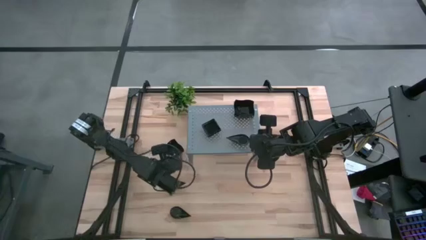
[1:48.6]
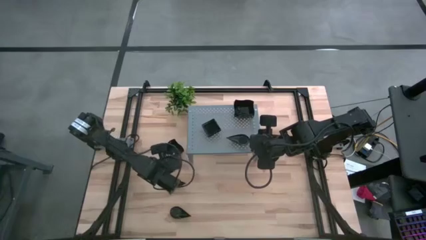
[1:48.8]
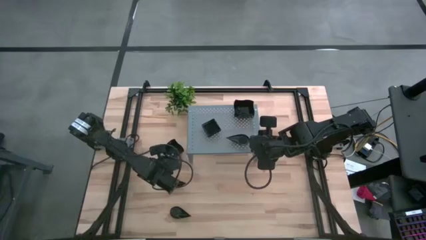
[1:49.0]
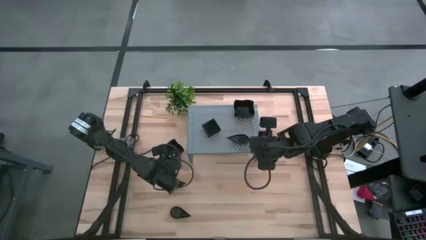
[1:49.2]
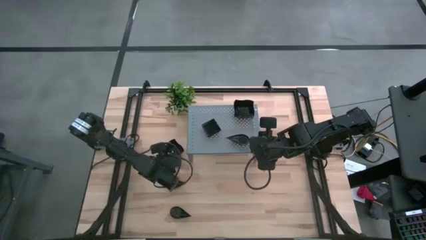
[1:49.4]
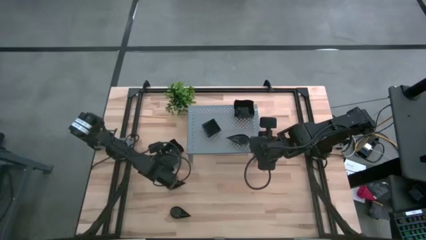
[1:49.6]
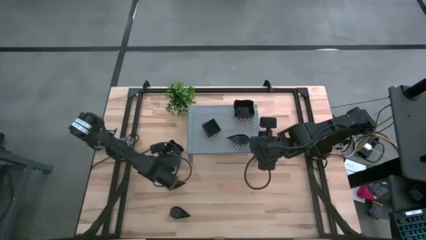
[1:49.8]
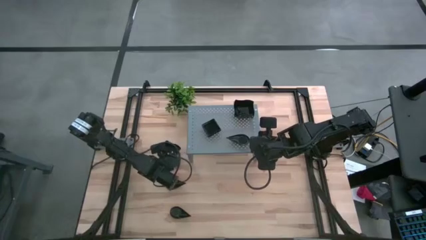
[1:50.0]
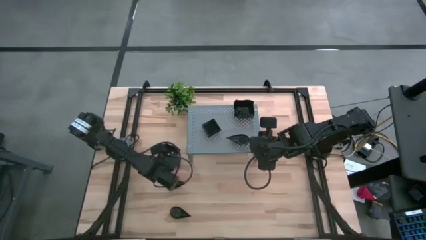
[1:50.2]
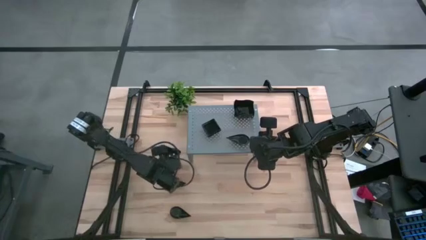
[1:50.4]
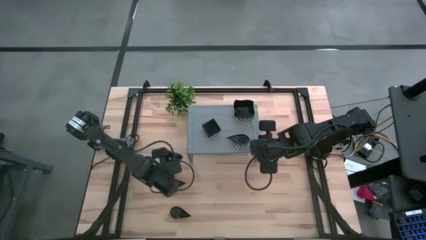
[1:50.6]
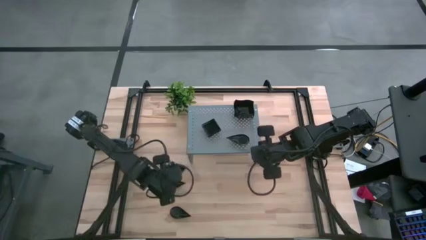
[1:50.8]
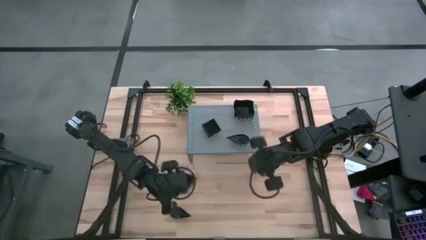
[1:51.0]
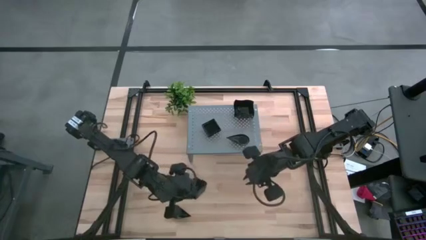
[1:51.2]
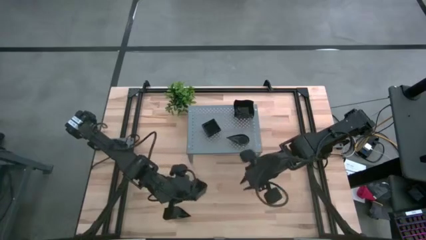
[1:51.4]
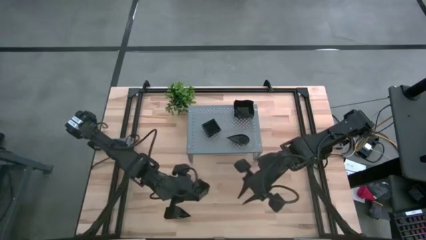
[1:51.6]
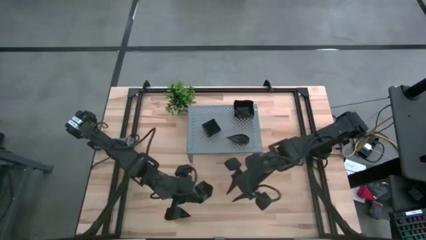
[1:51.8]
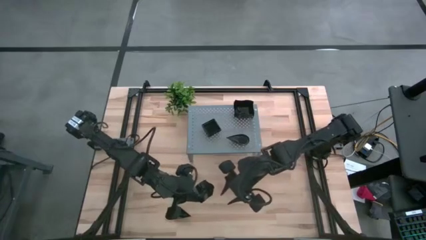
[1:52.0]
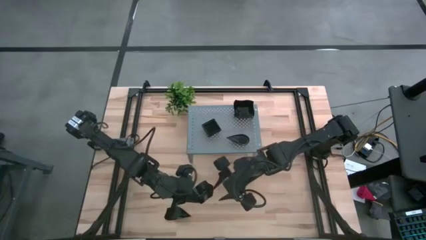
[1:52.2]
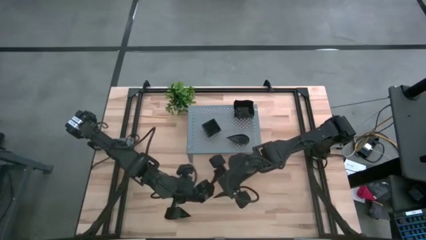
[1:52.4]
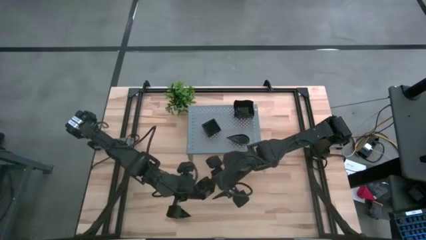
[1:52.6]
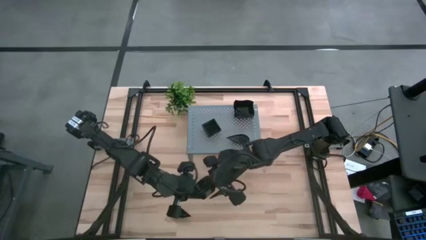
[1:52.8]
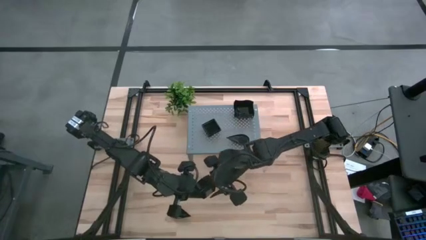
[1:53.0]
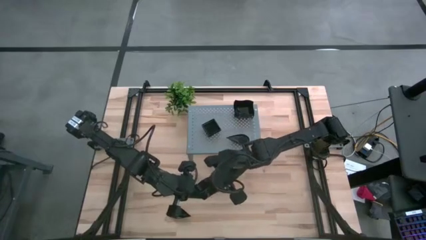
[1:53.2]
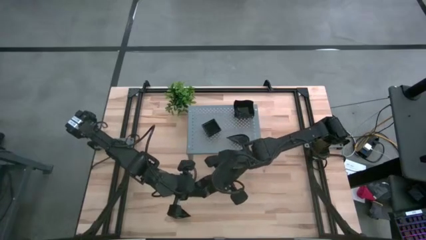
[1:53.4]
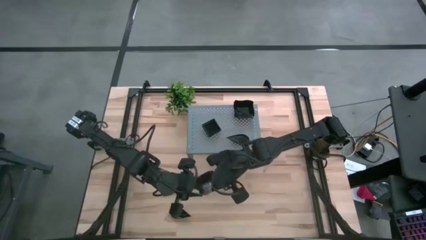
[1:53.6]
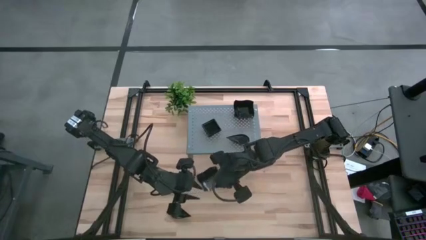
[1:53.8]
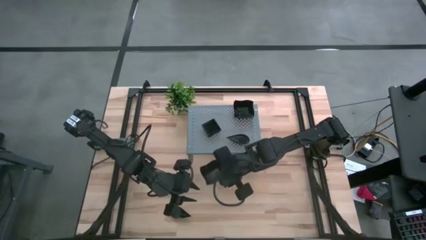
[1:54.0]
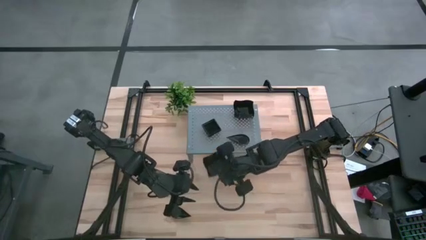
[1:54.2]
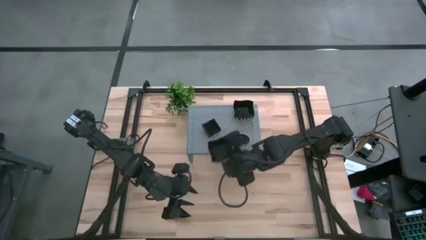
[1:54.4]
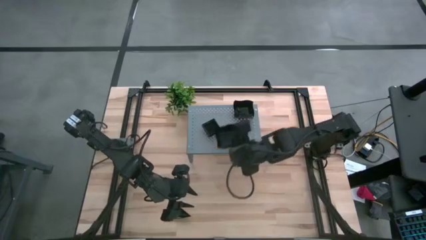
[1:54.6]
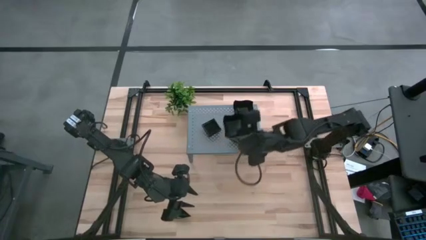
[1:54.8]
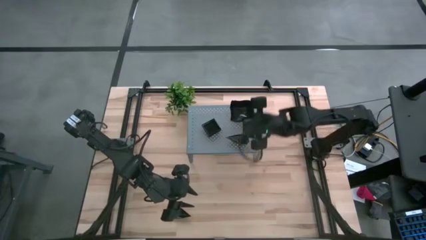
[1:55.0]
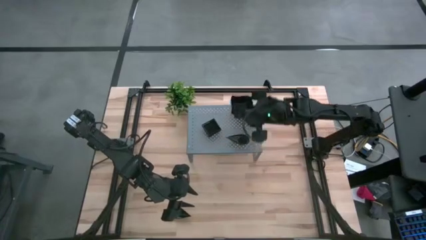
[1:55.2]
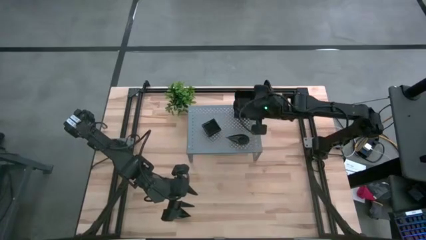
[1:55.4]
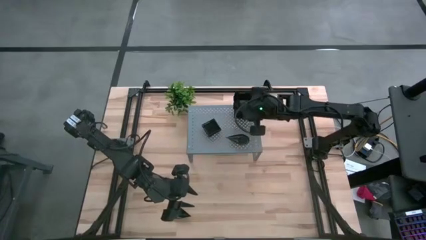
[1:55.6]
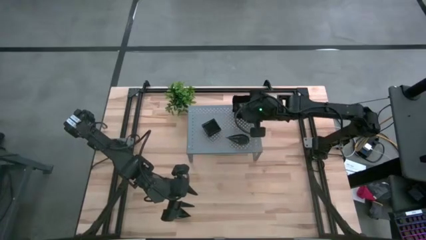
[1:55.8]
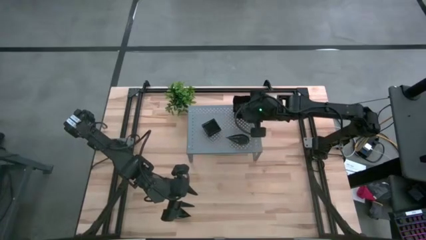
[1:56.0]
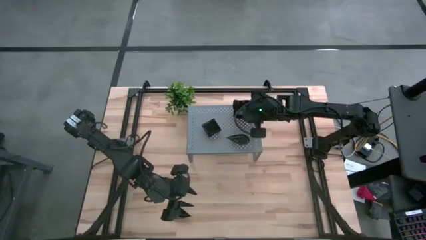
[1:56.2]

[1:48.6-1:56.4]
Task: Pick & Place Mini shaped plates
Stack the black distorted square plate on top of the black distorted square plate on the shelf

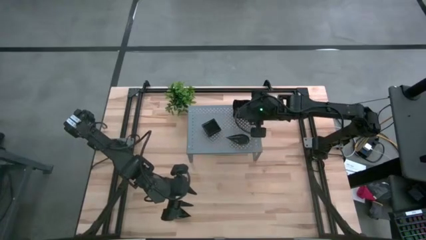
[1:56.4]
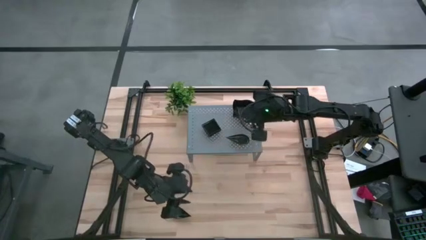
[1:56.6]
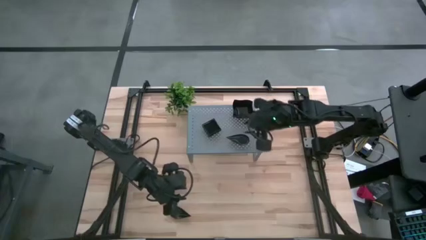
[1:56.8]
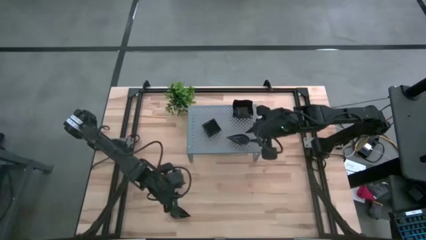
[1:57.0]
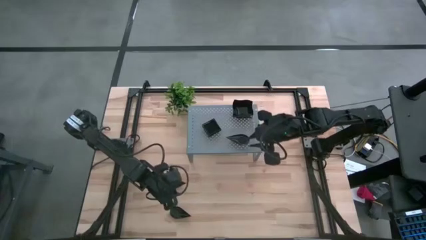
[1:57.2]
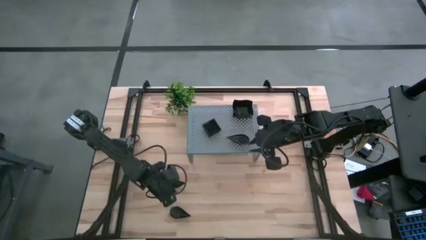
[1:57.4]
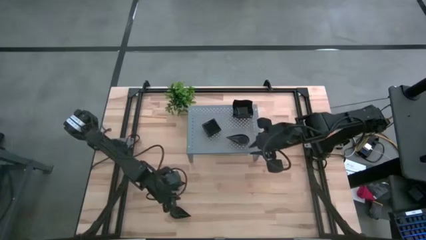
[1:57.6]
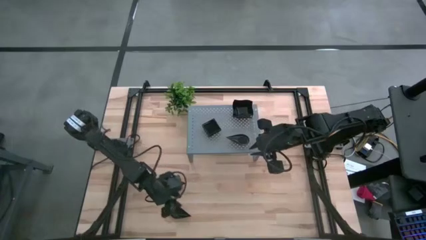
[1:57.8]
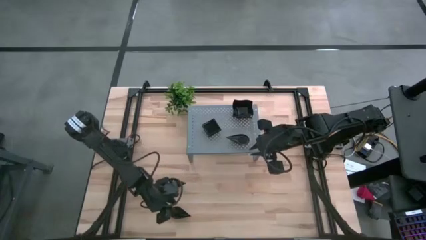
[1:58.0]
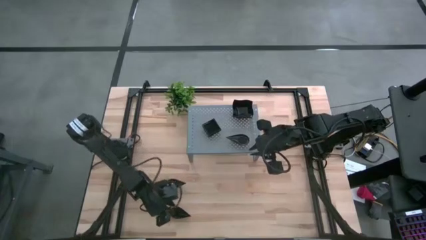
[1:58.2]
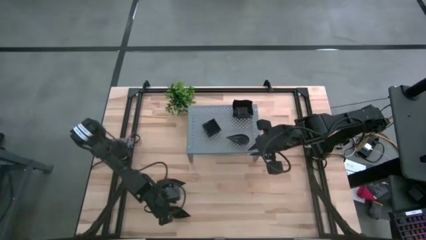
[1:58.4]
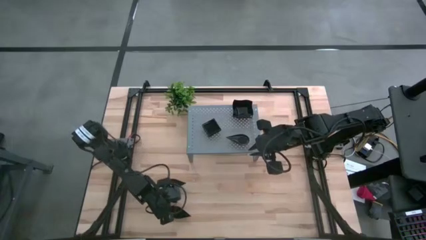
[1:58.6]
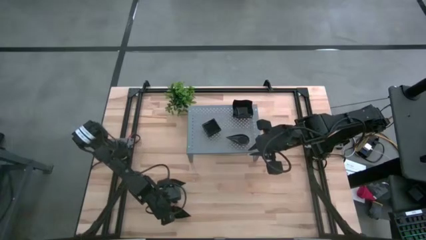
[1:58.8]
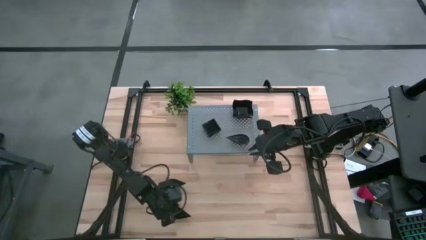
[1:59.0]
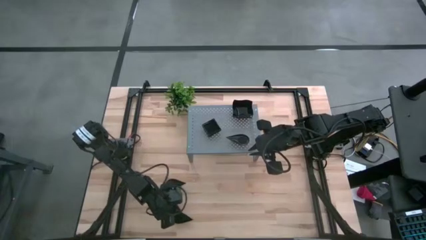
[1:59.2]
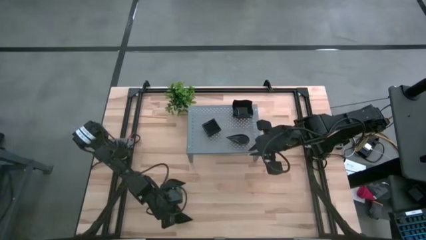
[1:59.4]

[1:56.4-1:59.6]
Stack the black drop-shaped plate on top of the black drop-shaped plate on the shelf

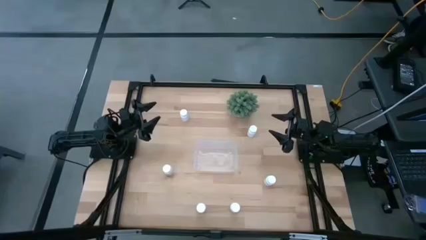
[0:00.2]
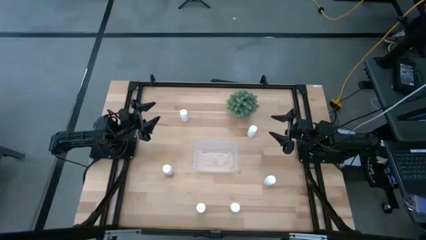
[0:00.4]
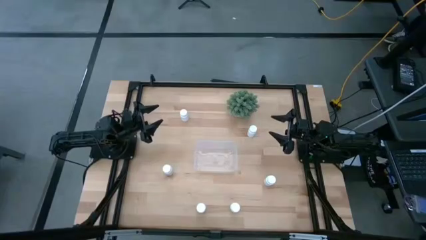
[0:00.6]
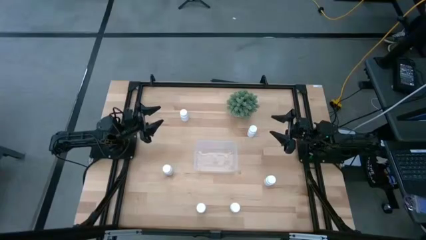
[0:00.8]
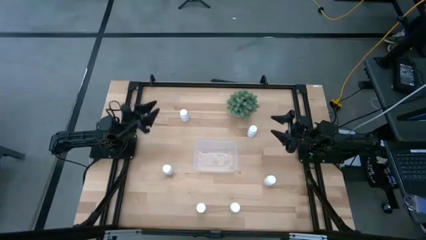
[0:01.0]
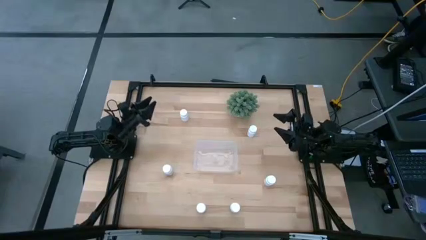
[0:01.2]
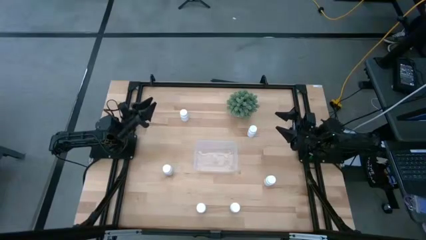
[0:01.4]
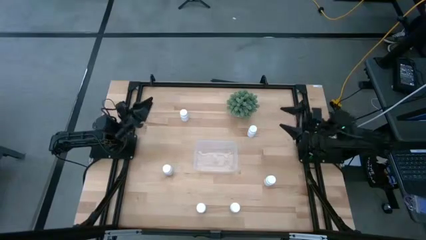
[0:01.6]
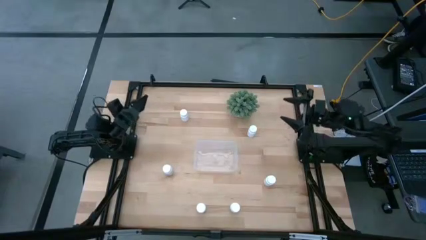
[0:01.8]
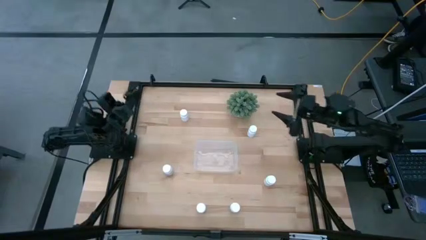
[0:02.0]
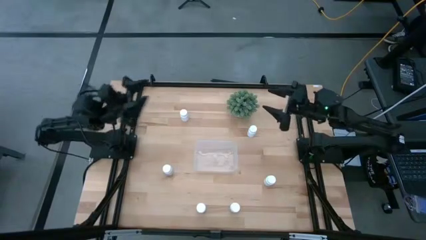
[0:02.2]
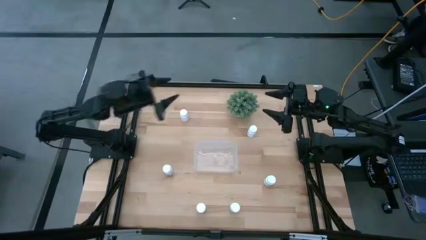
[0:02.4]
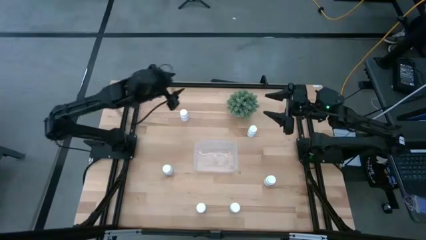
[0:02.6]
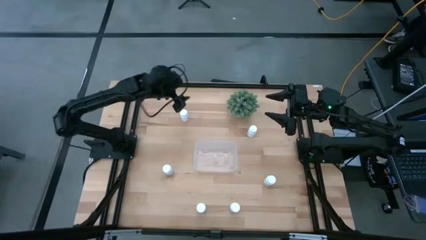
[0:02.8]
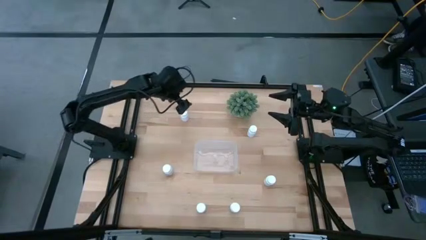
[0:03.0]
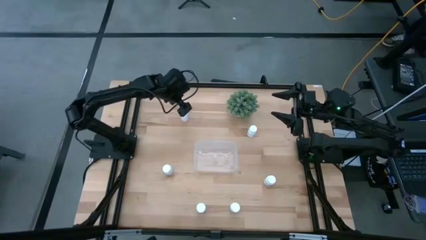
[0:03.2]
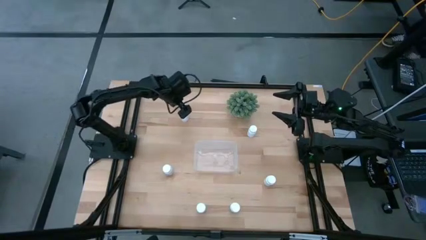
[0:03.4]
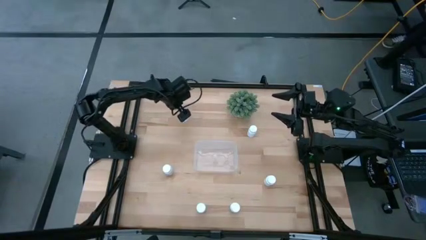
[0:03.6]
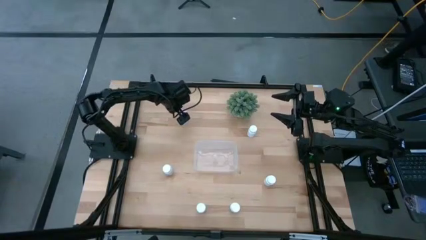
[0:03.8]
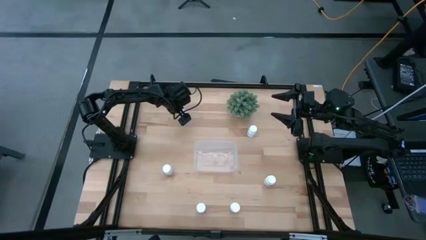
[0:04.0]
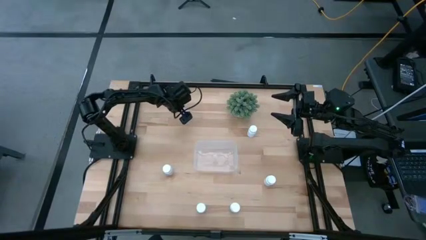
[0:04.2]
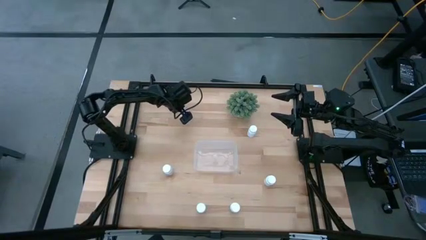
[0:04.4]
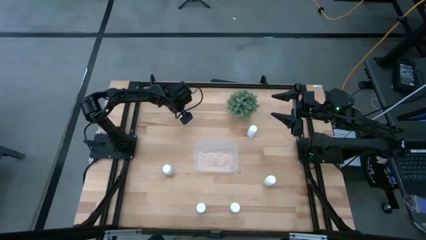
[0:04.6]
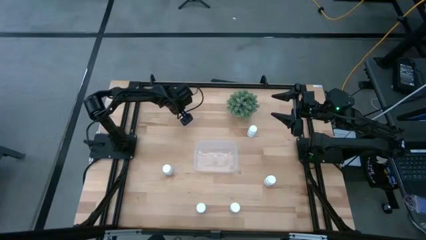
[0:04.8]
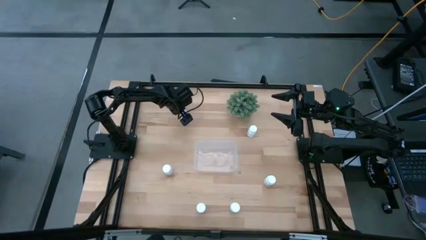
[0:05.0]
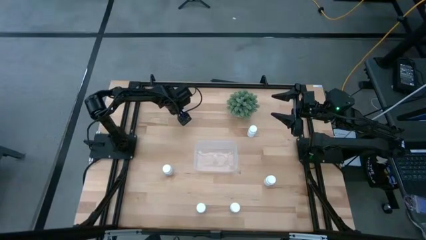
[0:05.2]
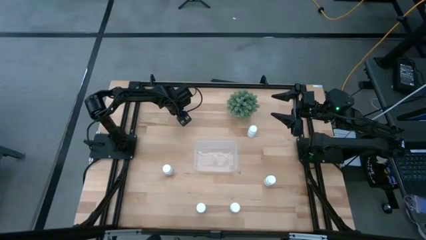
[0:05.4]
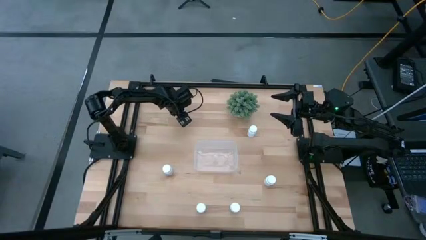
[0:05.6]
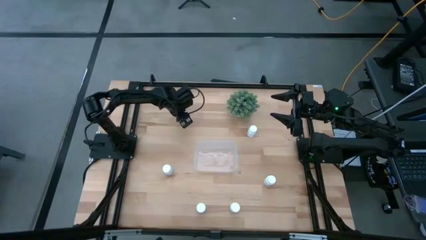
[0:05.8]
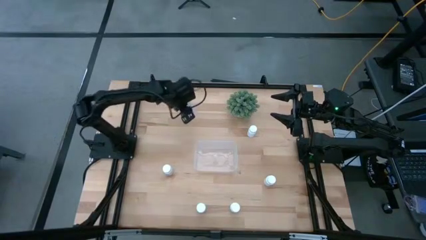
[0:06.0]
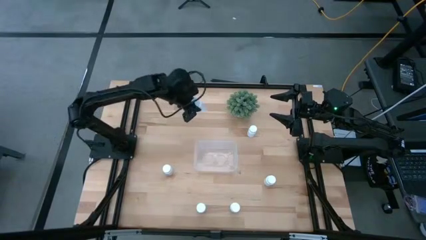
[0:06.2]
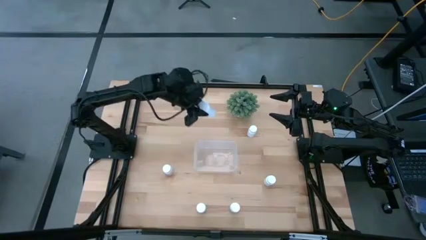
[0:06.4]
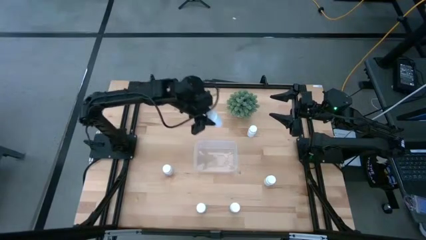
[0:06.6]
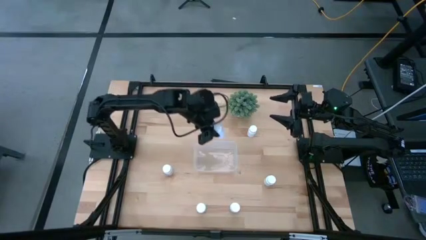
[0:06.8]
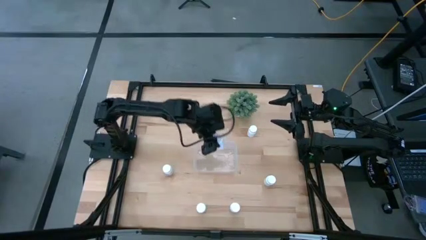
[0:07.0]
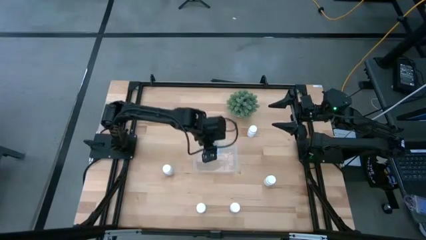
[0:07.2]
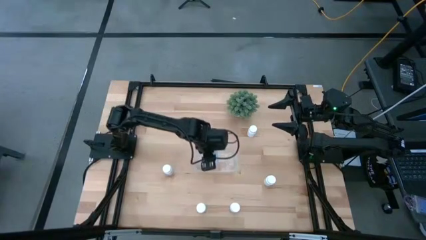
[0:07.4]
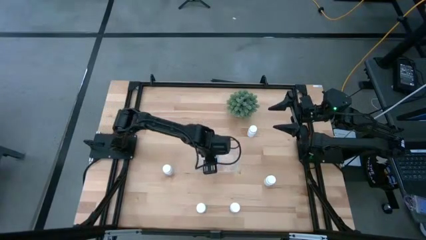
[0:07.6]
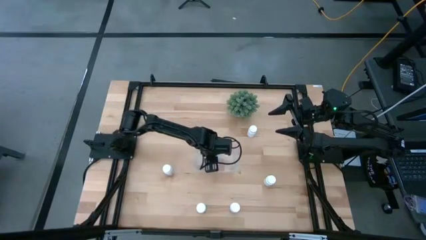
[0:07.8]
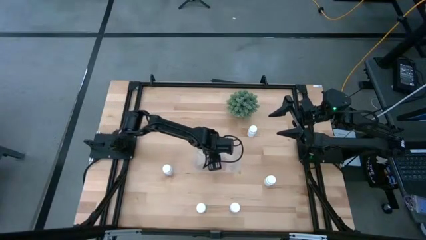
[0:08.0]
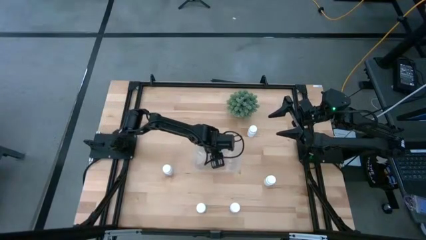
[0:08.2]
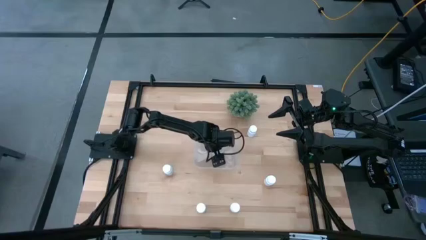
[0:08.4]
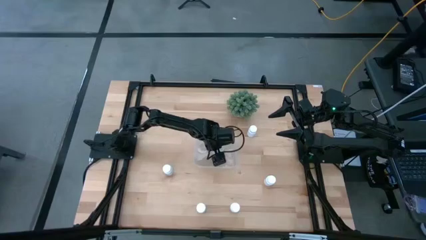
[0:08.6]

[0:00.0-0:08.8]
Task: Pick and place pill bottles into a basket
Put the white pill bottle into the transparent bin
